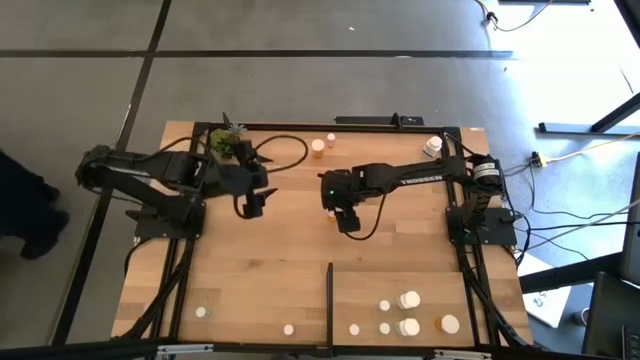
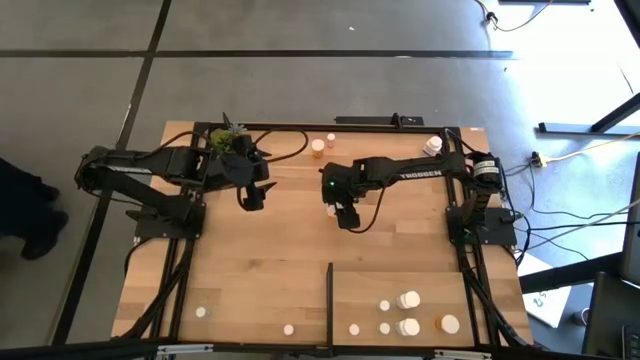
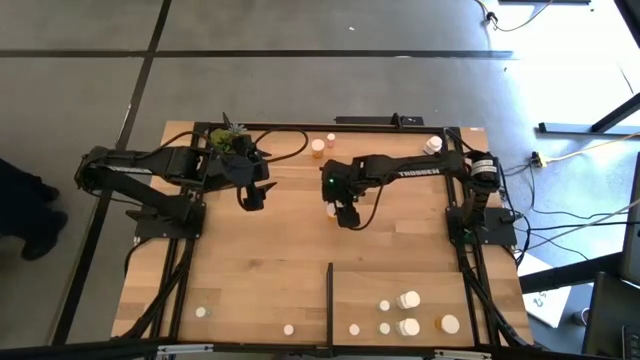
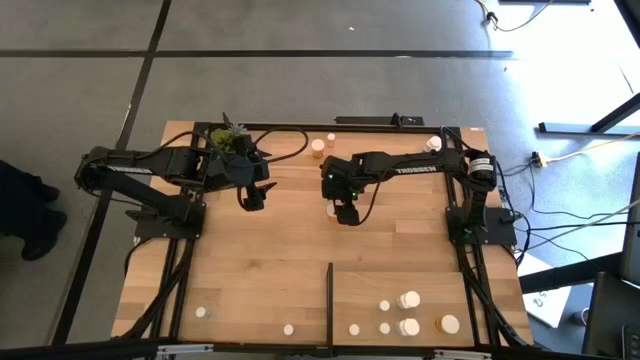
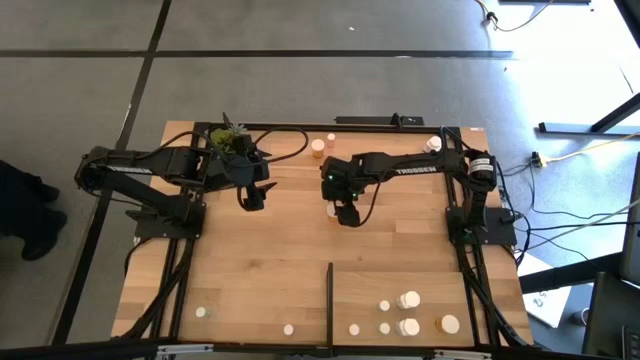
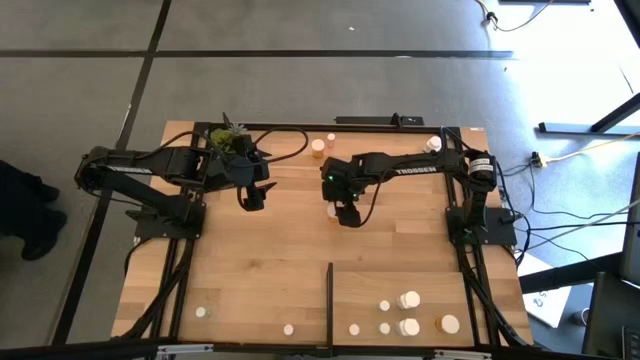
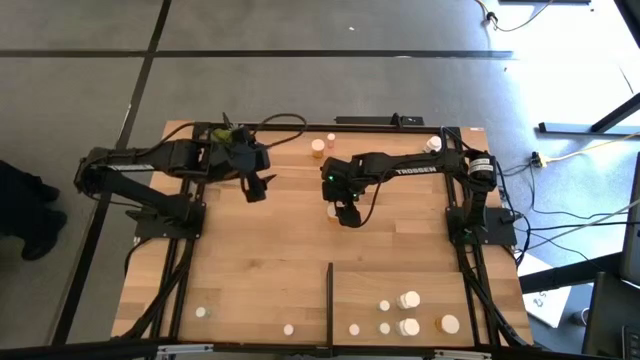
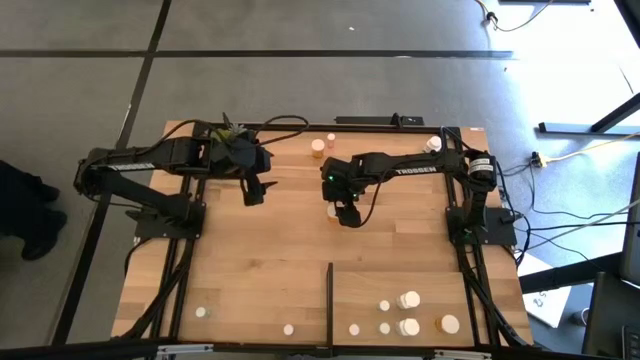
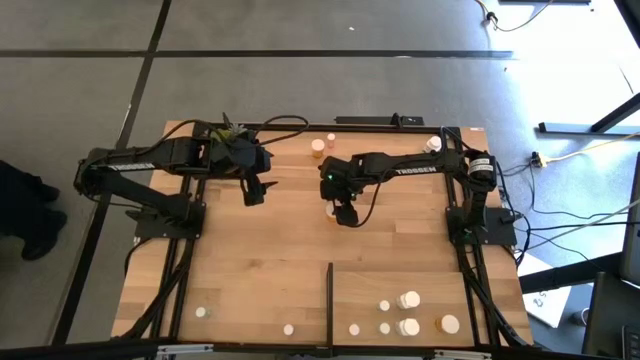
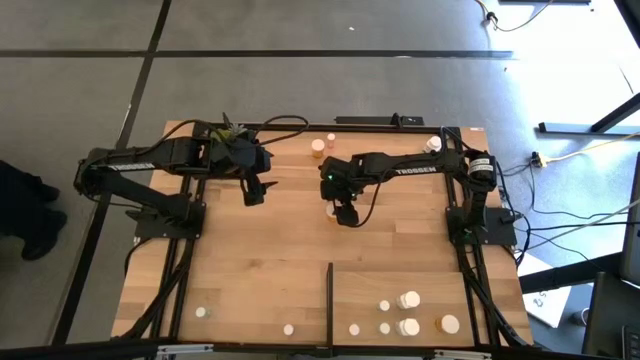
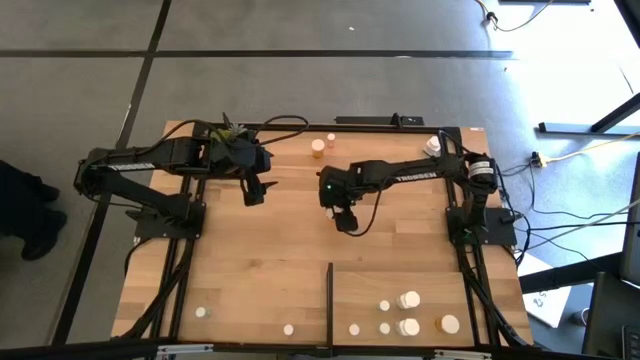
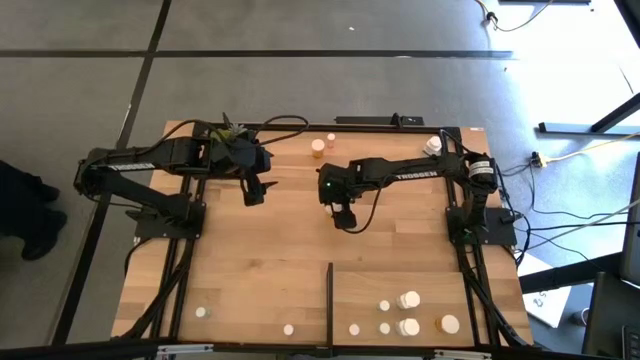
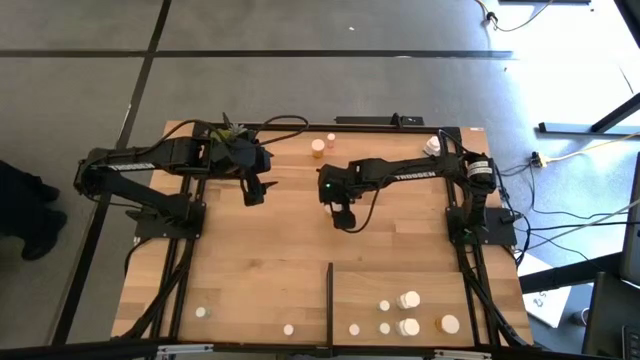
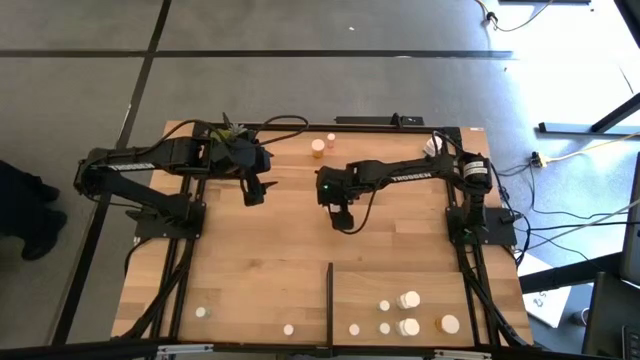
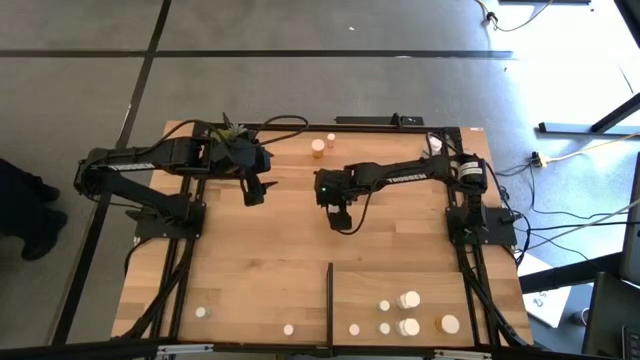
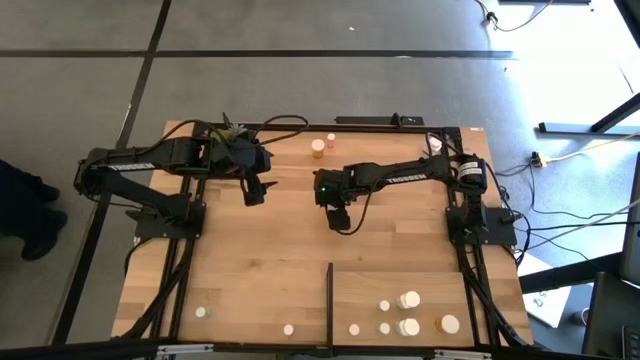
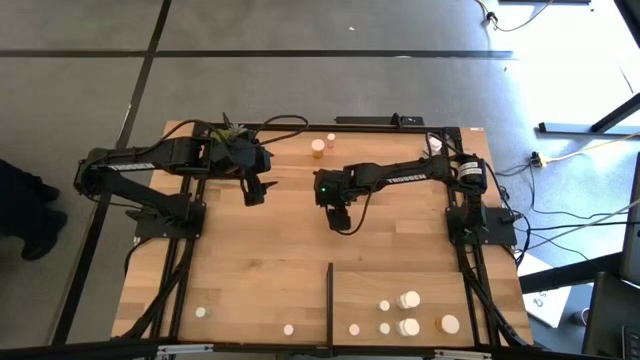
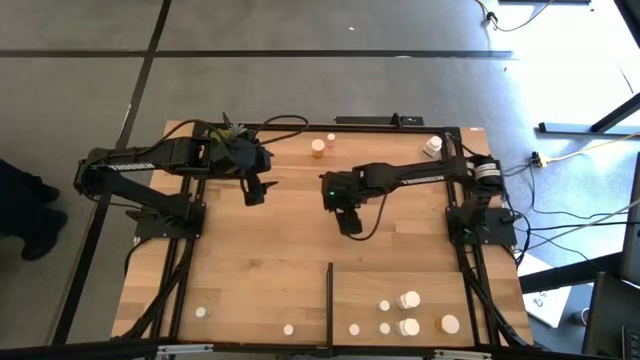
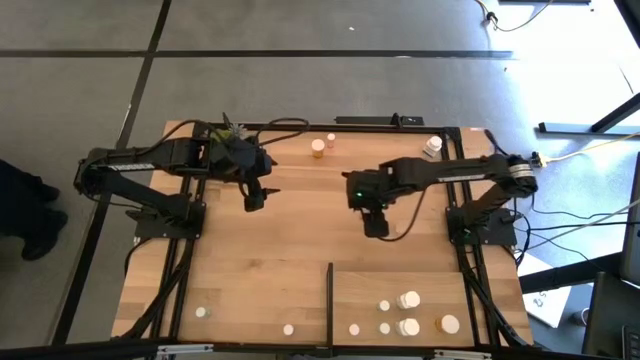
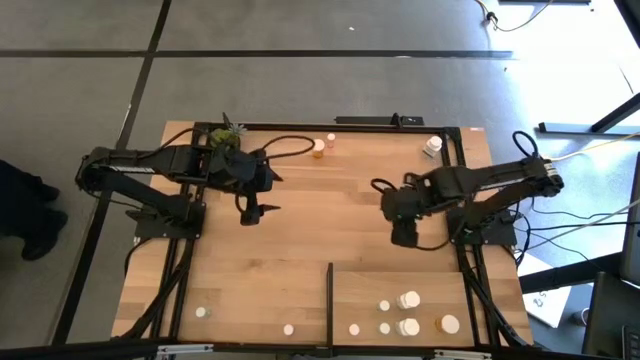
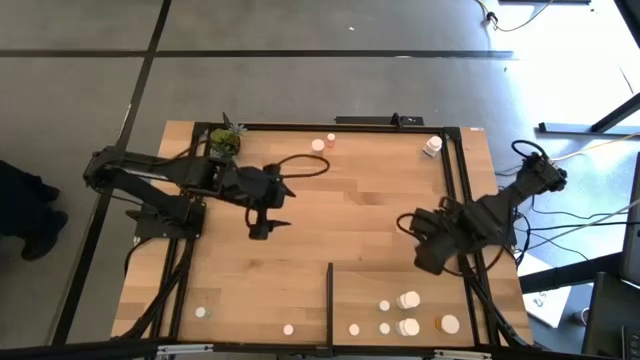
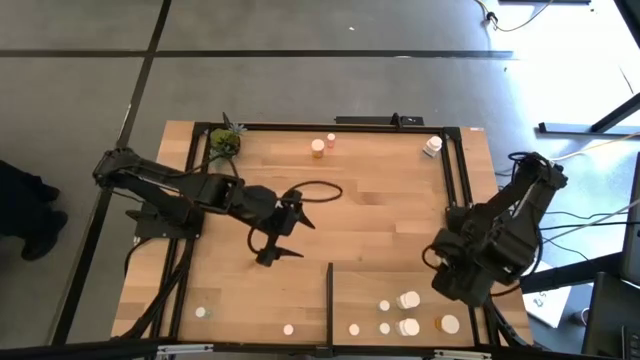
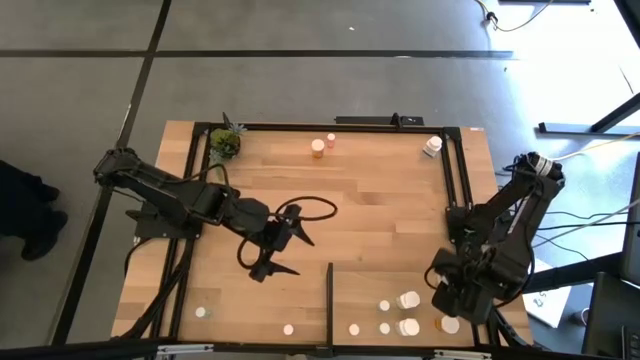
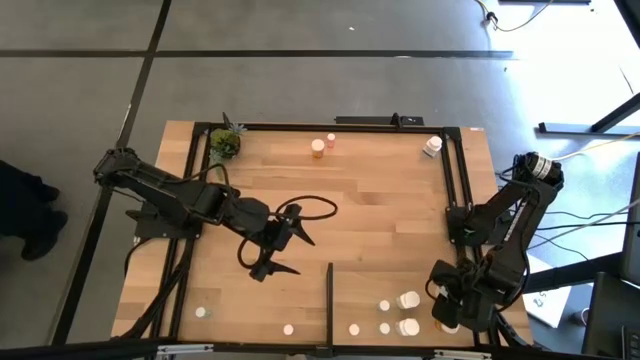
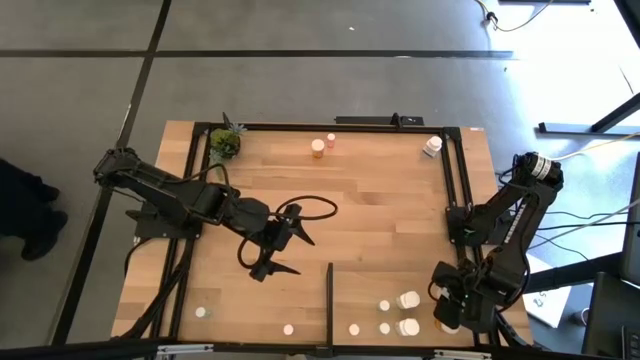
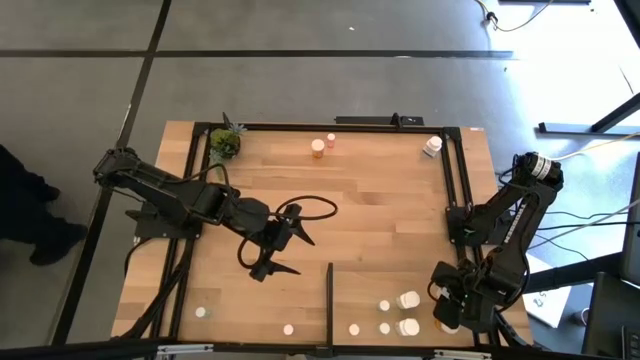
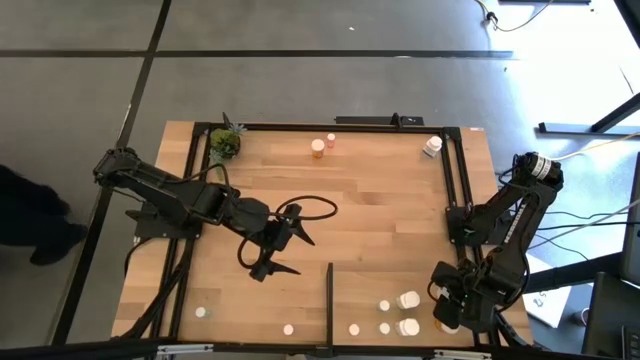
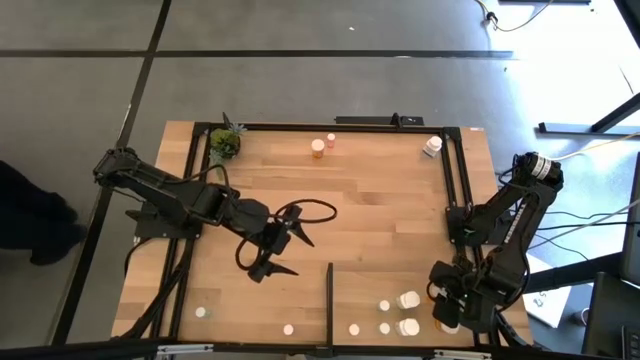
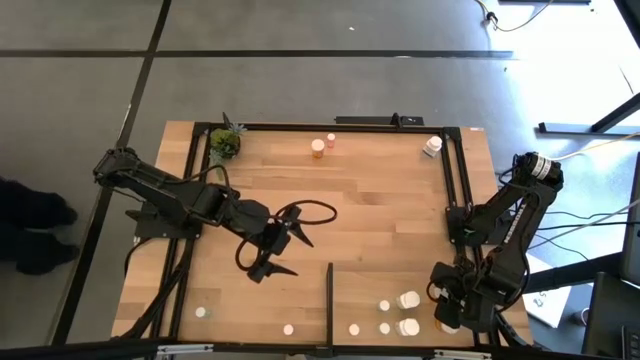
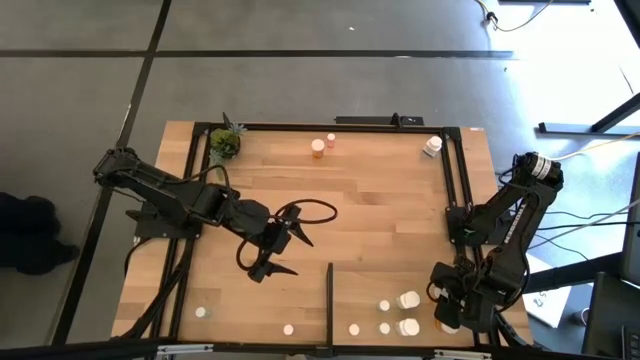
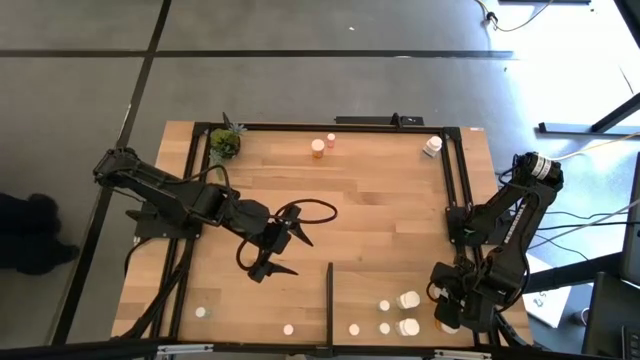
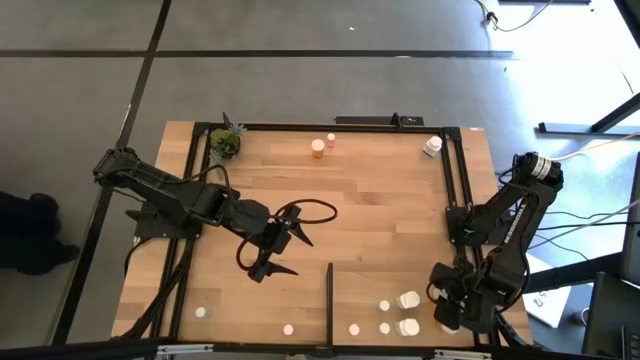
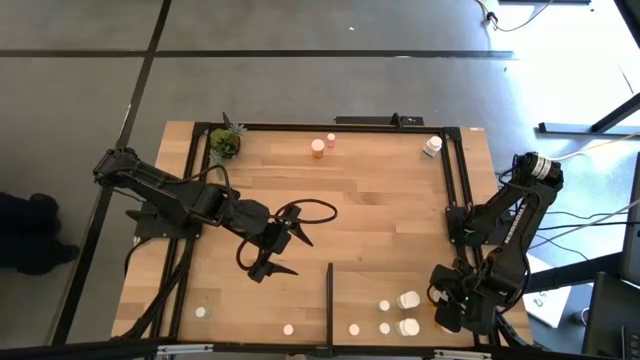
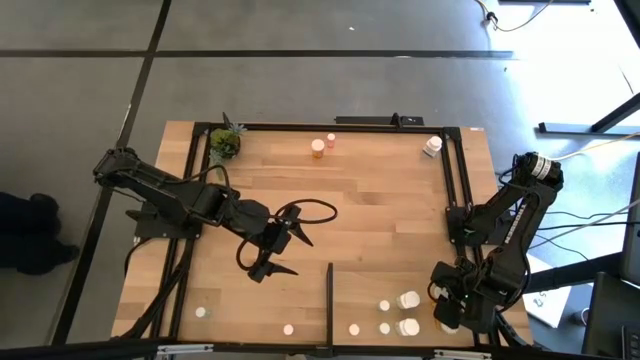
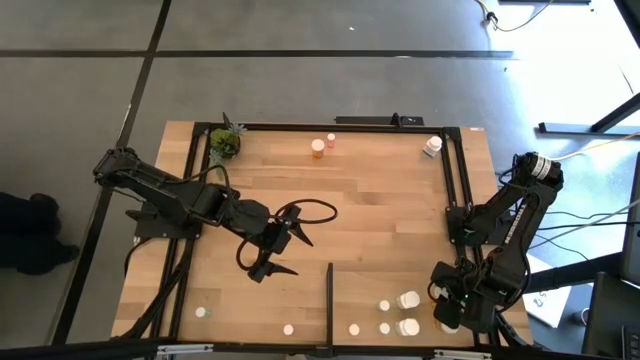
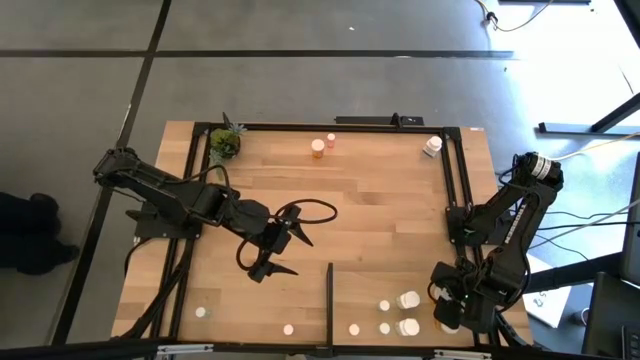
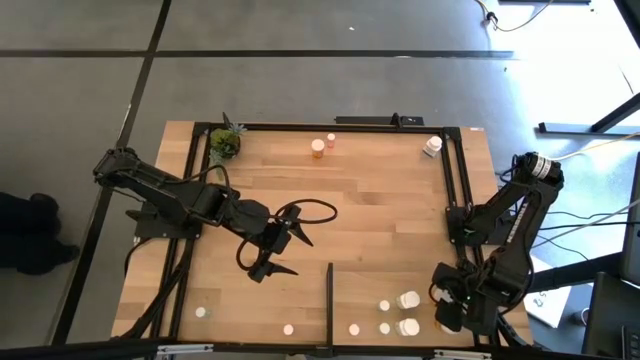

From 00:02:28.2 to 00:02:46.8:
Task: Pick and place medicine bottles onto shelf by color
Put the bottom orange pill bottle on the shelf aligned with the other orange pill bottle

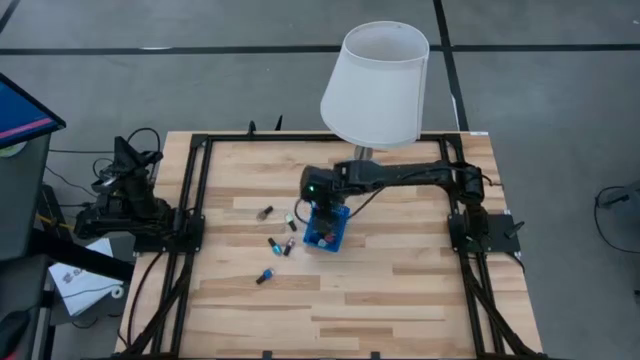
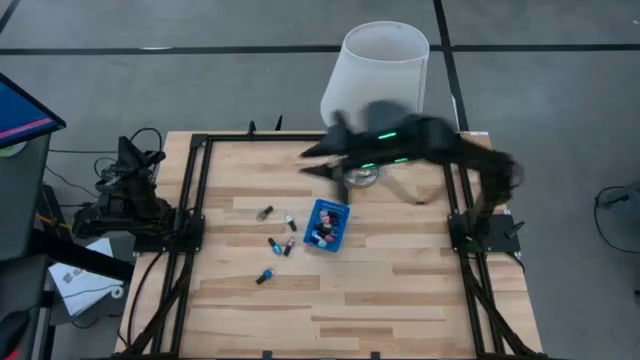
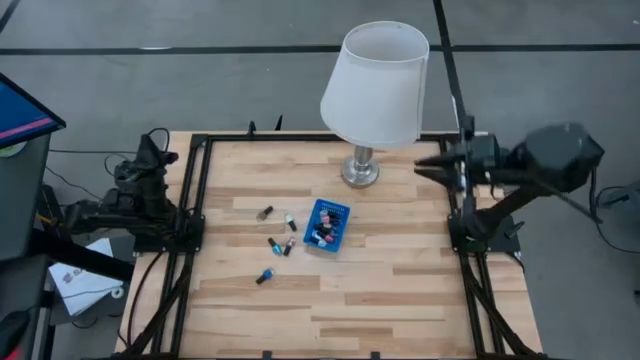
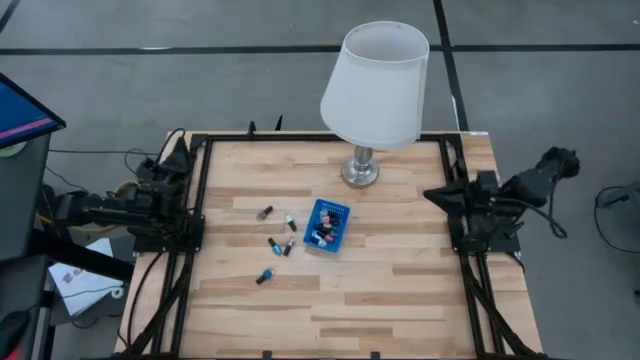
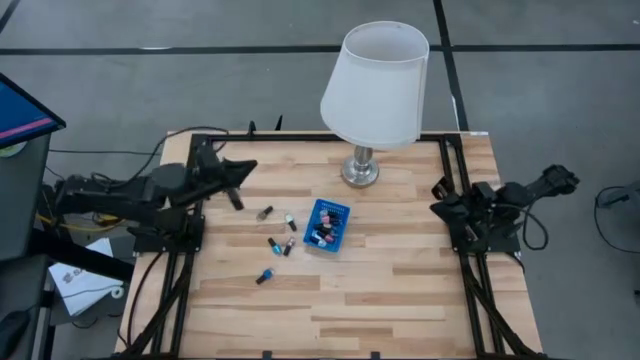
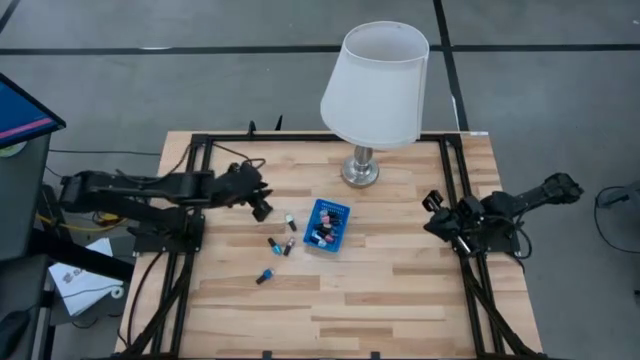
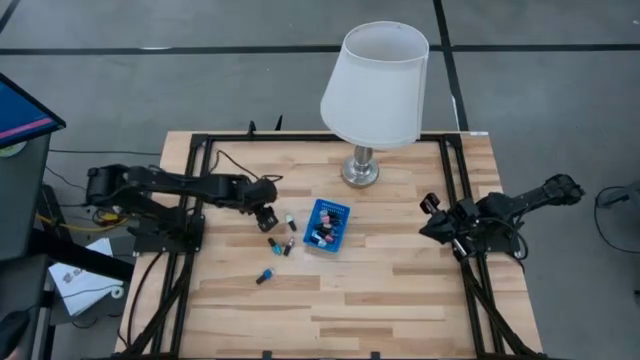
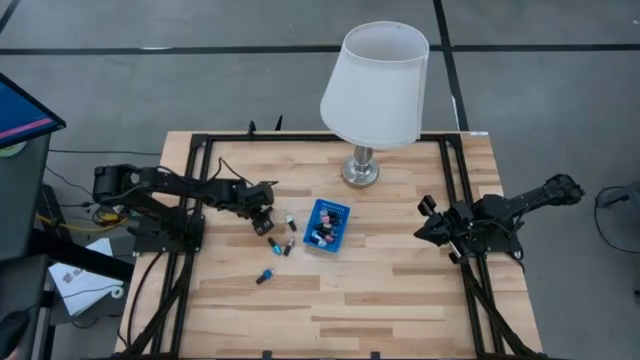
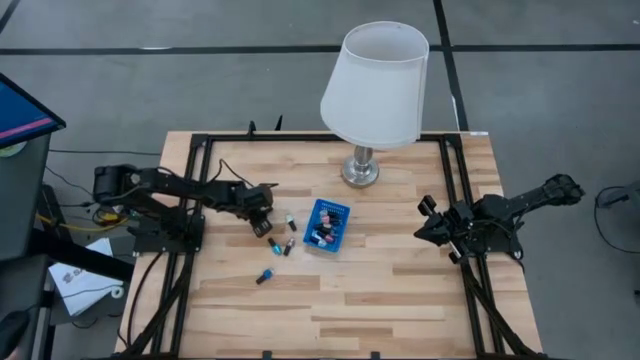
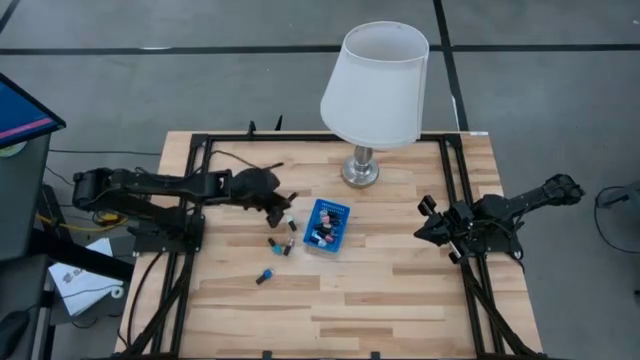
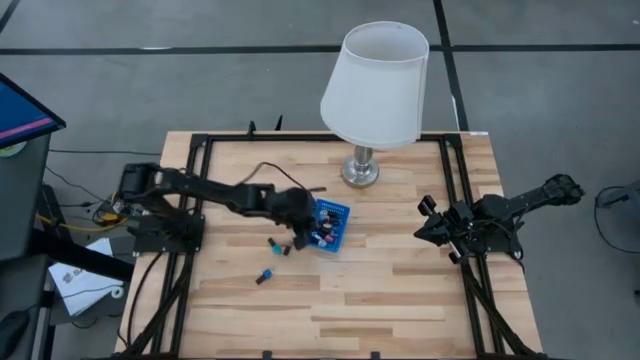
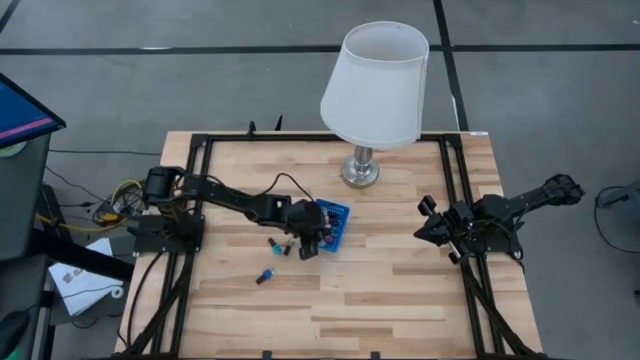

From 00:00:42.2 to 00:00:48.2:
Task: Pick & Place Nail Polish
Put the brown nail polish into the blue basket
